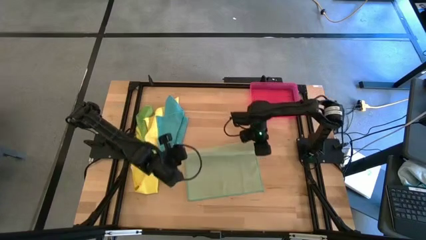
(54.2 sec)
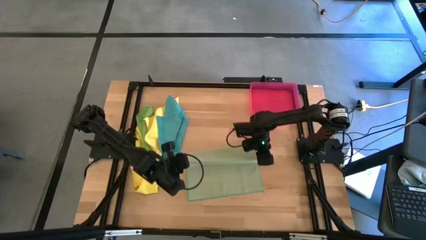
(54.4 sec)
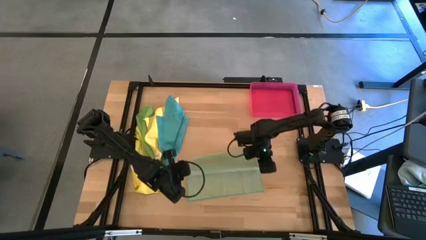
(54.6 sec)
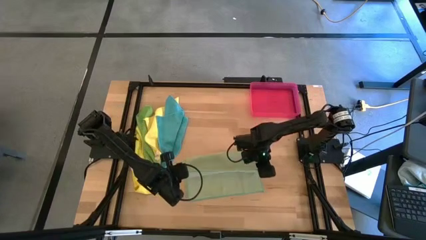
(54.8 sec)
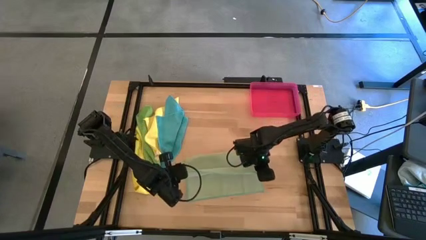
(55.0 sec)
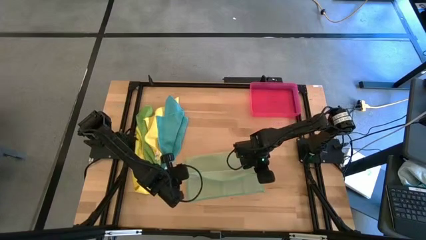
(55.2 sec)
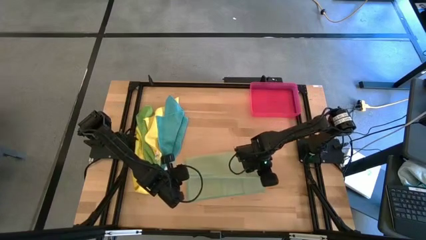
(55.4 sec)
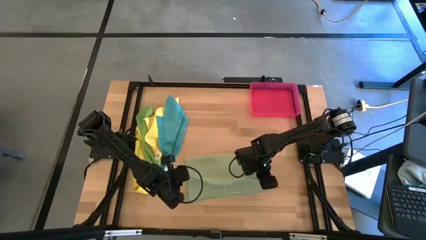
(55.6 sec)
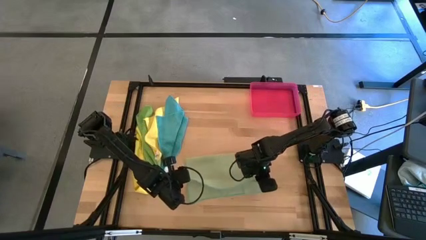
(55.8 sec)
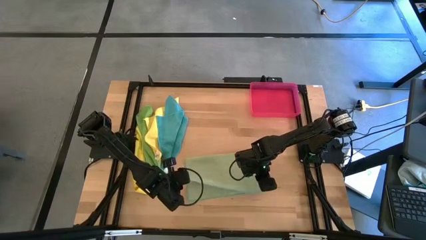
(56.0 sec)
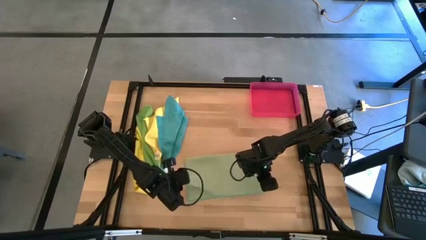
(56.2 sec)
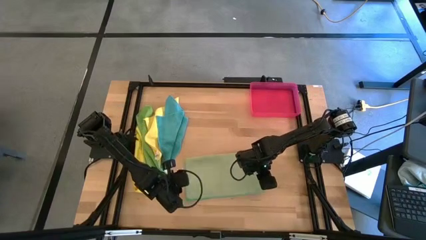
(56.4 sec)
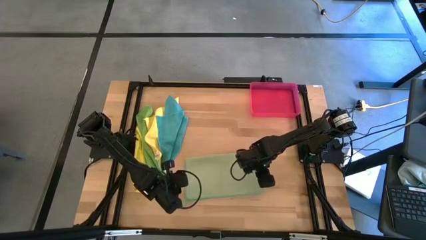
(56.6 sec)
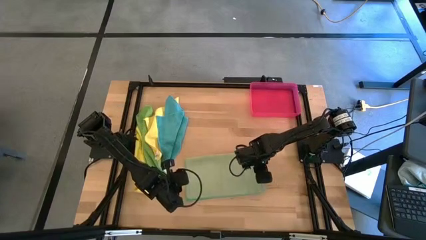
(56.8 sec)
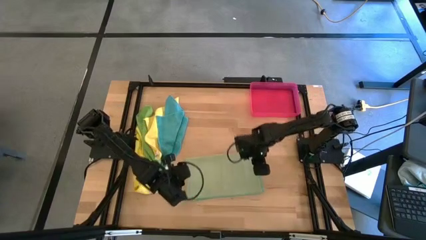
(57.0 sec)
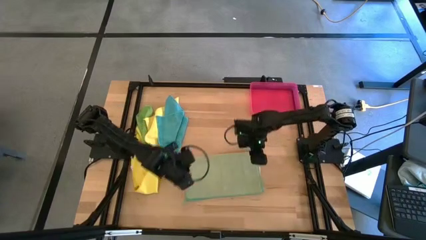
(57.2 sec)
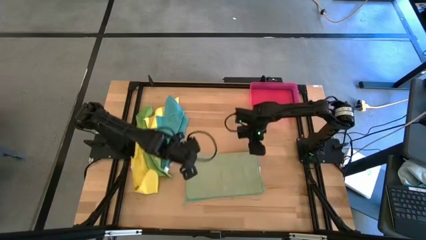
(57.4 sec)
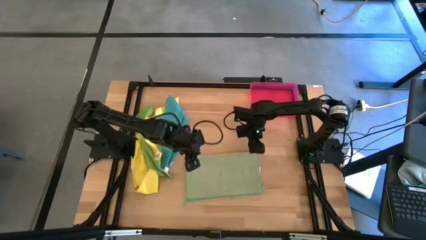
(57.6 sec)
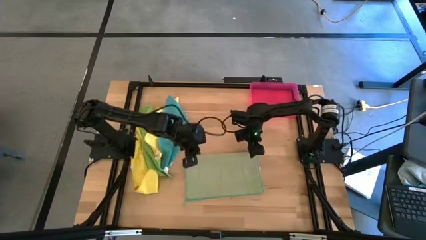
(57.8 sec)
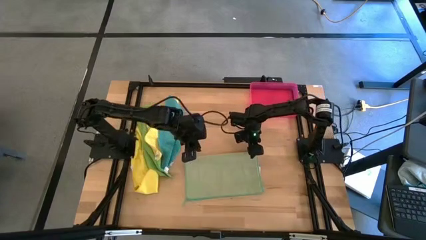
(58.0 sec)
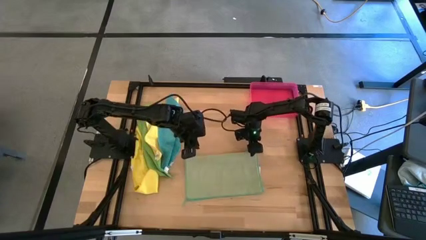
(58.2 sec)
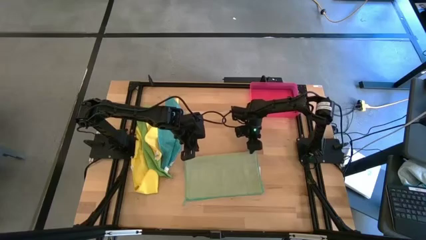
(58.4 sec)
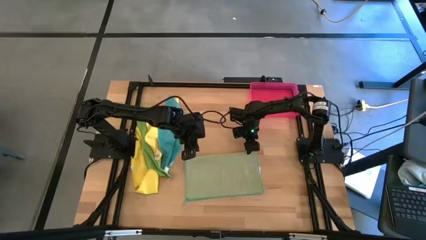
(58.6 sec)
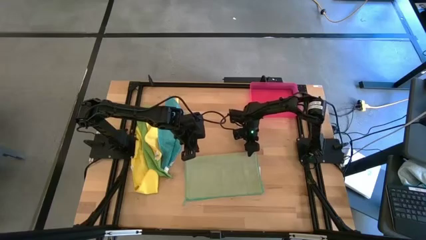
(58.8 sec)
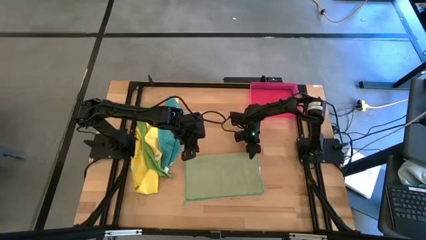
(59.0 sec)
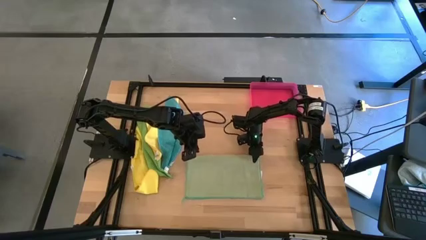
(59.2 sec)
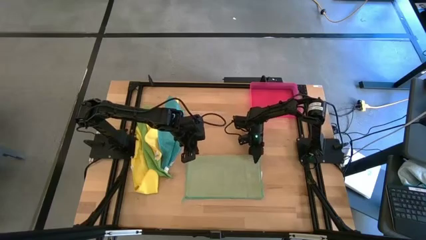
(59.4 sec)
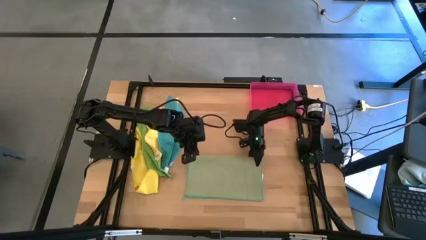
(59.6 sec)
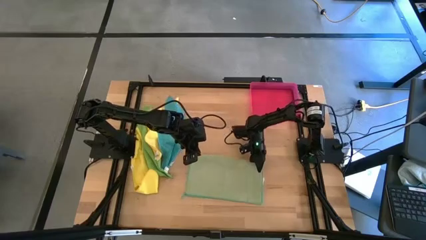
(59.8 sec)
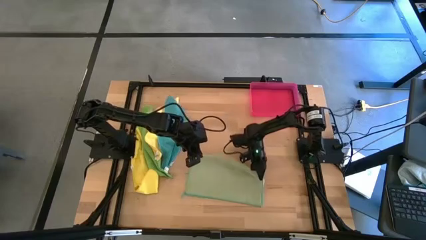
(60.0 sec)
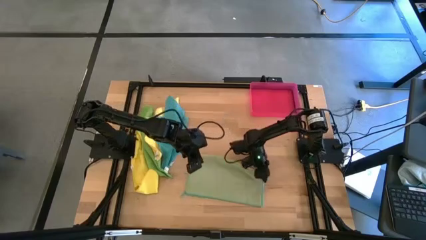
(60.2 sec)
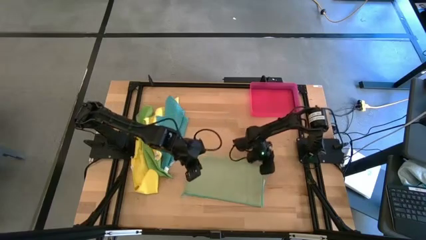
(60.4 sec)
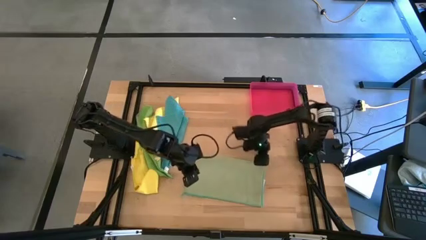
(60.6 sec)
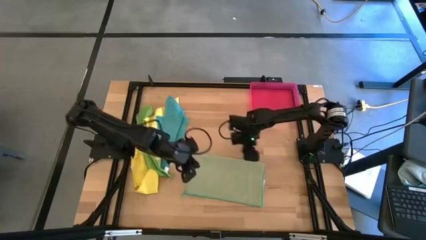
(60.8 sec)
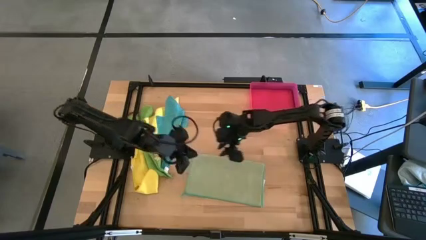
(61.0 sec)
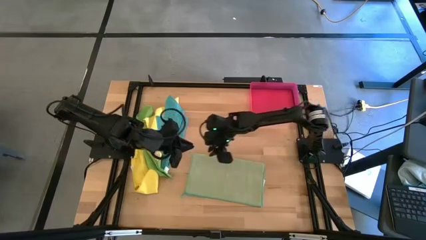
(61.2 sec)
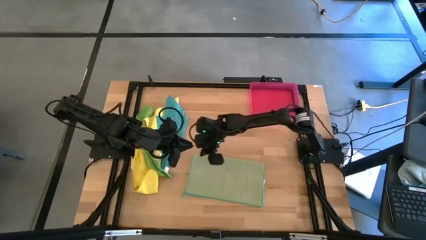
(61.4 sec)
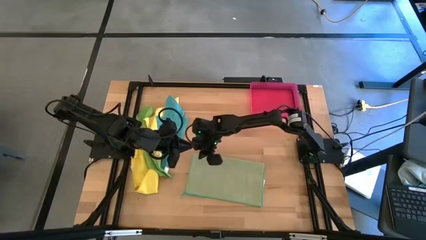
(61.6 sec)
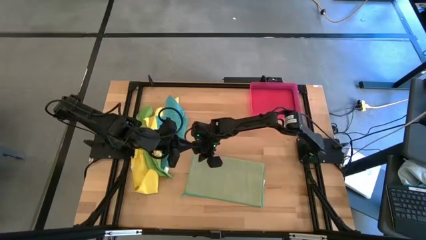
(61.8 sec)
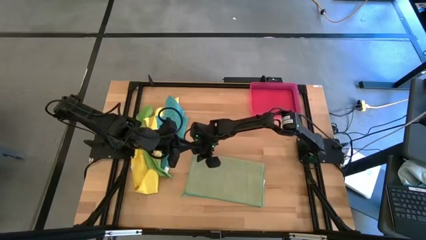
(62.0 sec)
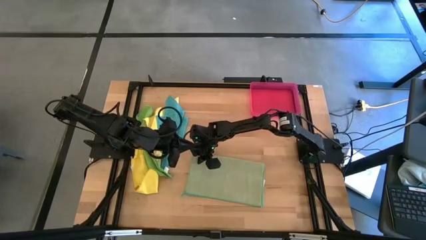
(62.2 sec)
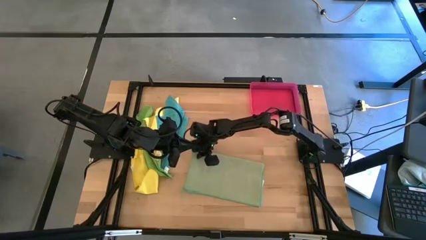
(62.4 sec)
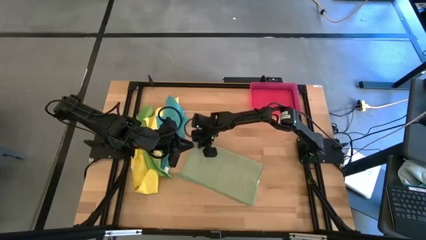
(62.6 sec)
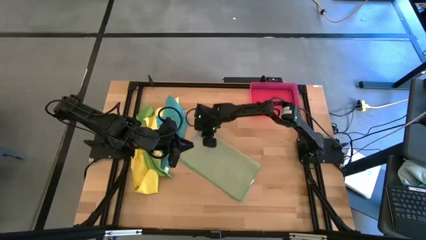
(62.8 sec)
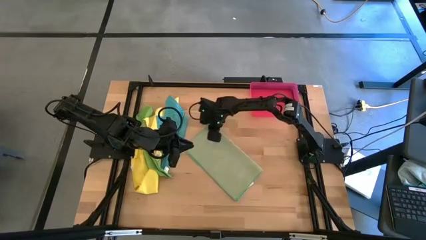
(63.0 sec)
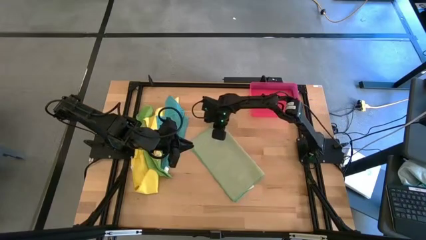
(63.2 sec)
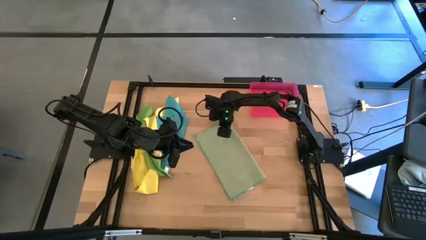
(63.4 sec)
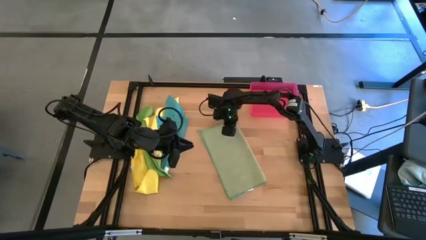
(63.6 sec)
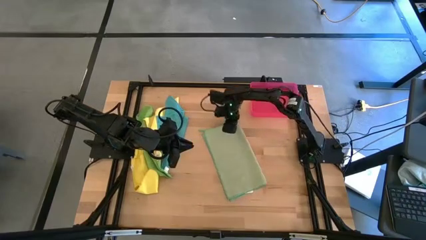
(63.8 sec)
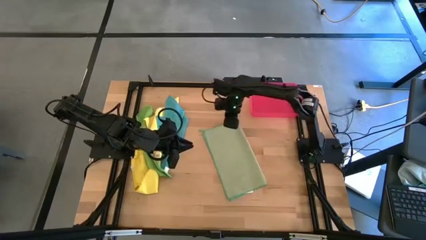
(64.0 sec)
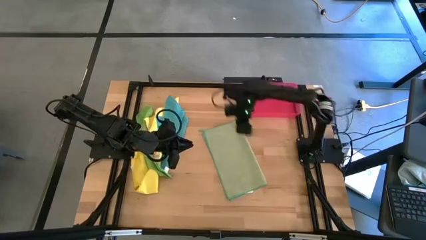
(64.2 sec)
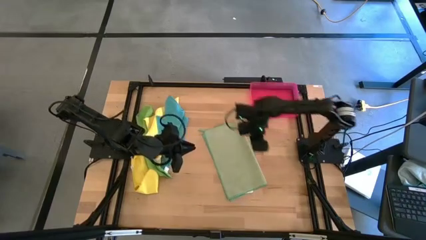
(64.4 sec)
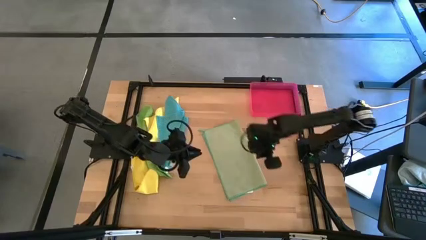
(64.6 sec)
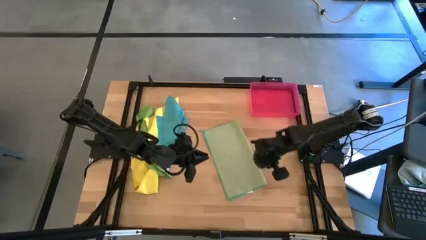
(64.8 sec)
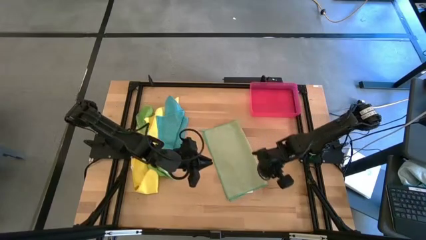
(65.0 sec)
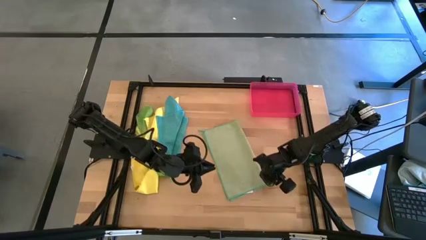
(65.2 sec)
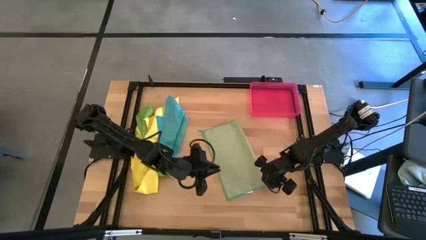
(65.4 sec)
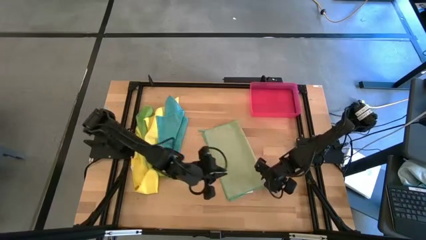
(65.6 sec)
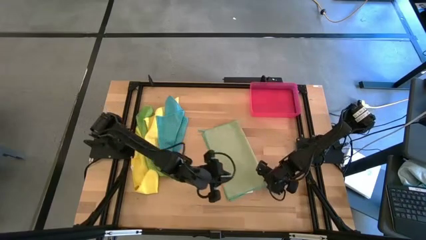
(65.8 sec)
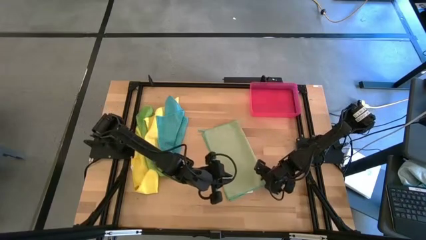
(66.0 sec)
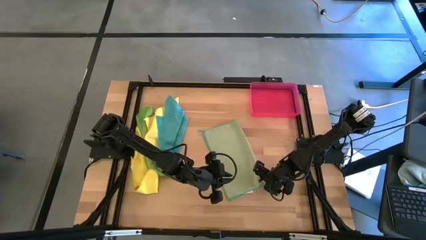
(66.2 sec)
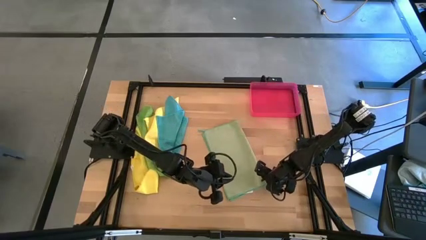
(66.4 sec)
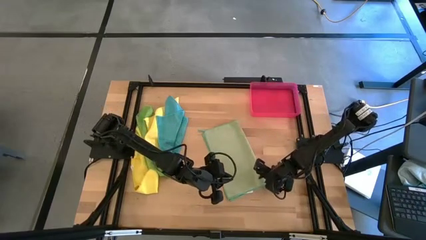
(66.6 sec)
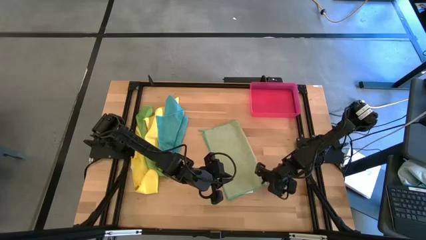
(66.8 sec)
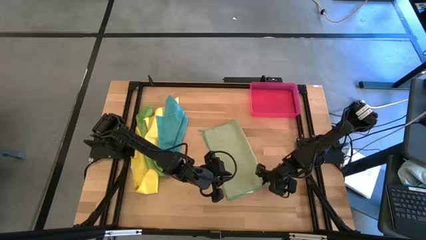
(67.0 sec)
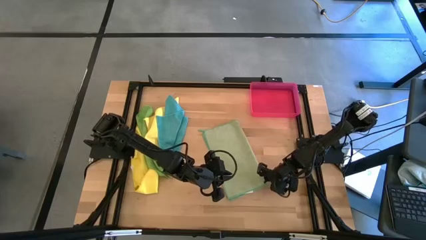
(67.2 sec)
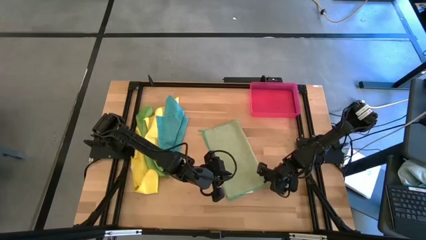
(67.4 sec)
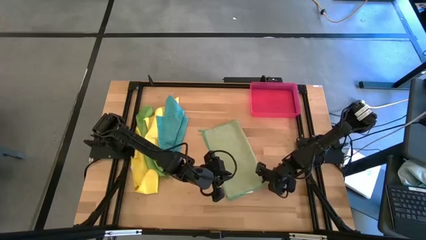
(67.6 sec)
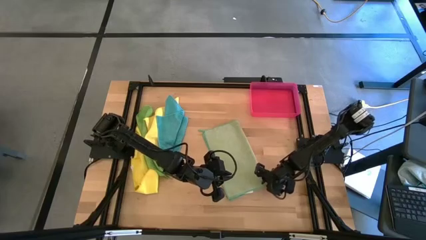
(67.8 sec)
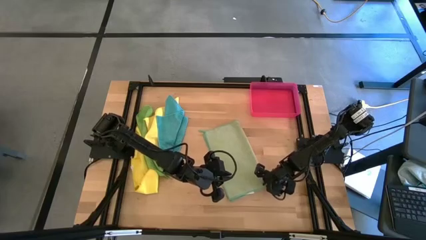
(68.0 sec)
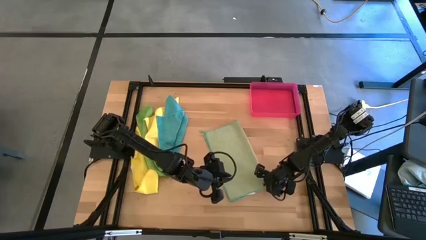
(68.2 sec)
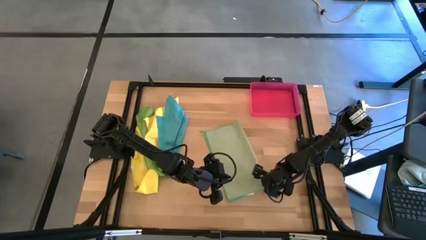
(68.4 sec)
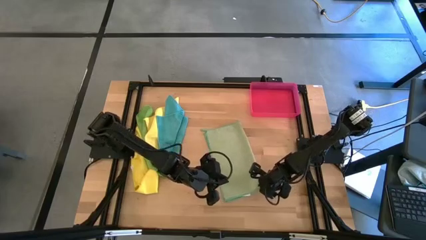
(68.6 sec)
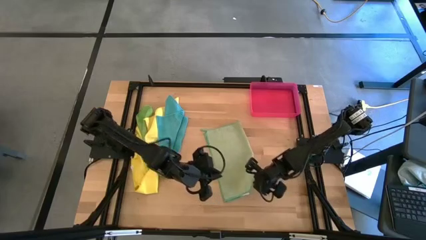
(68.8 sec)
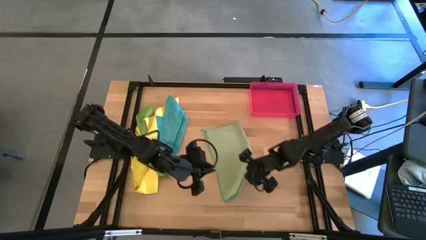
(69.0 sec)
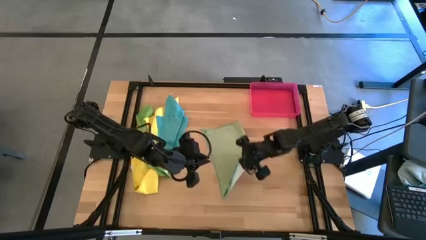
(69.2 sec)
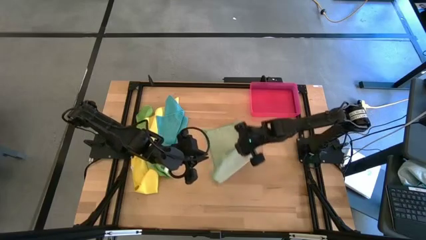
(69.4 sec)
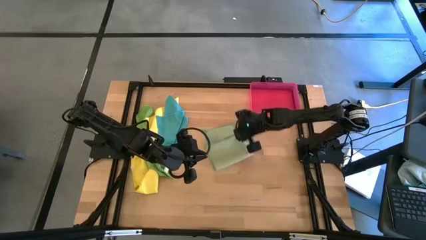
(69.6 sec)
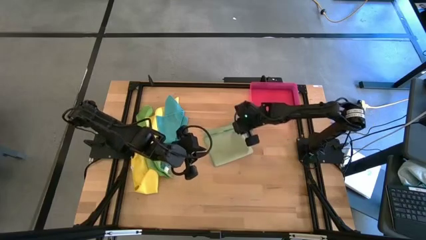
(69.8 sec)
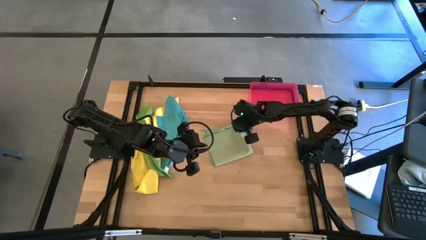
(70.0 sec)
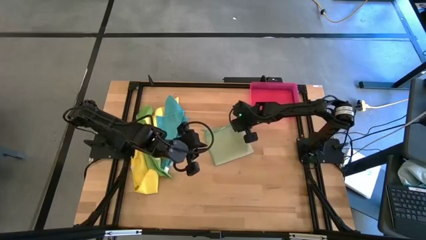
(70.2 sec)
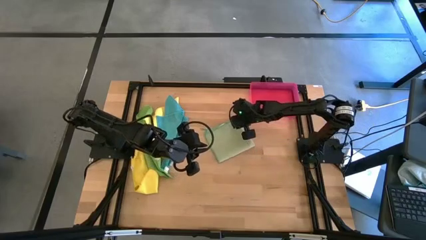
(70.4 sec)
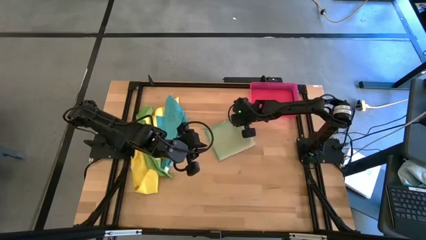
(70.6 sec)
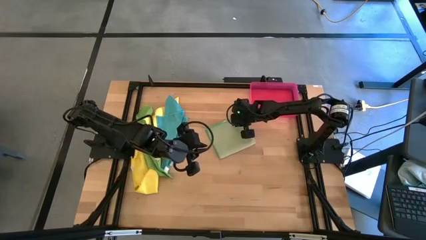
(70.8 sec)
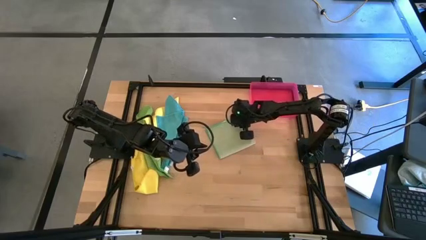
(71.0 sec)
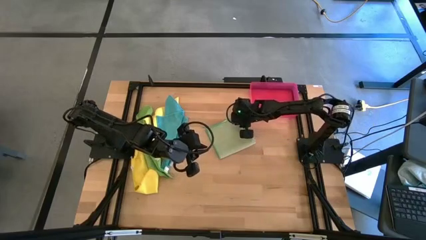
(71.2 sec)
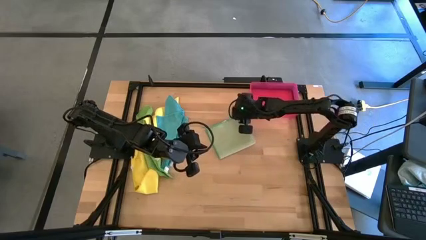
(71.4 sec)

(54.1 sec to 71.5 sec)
Task: Fold microfiber towels
Fold the light green towel
